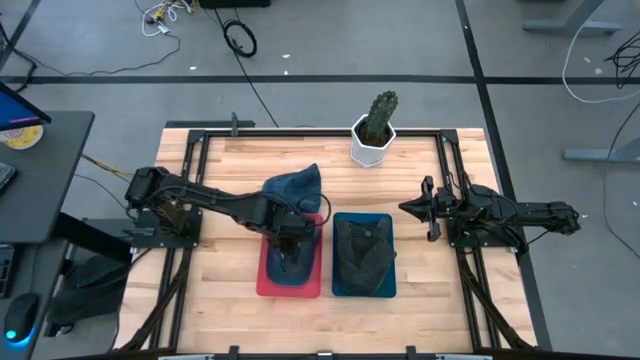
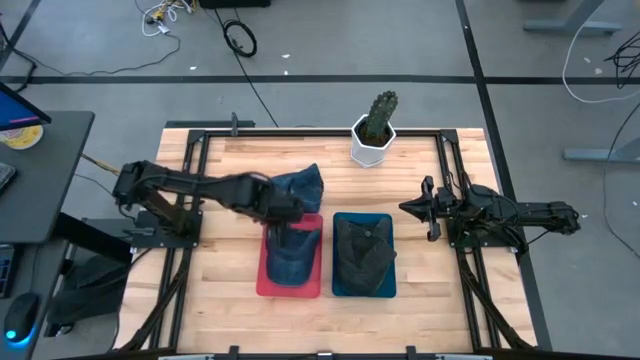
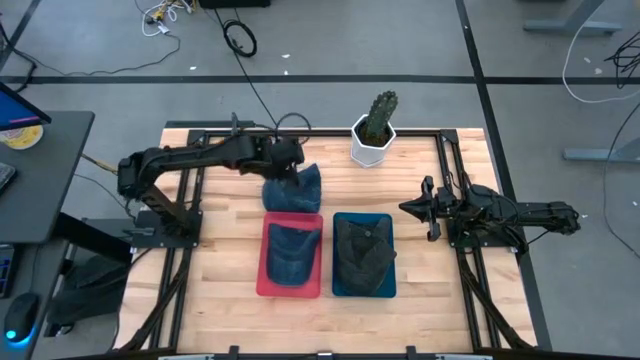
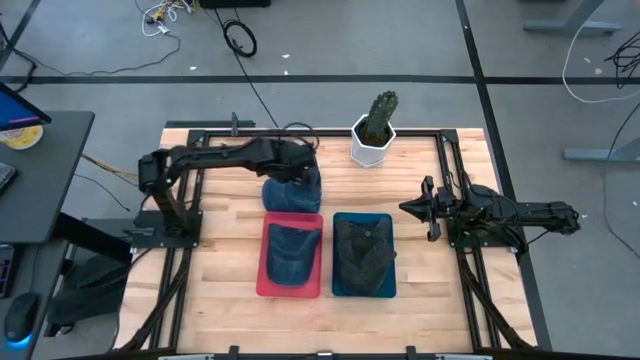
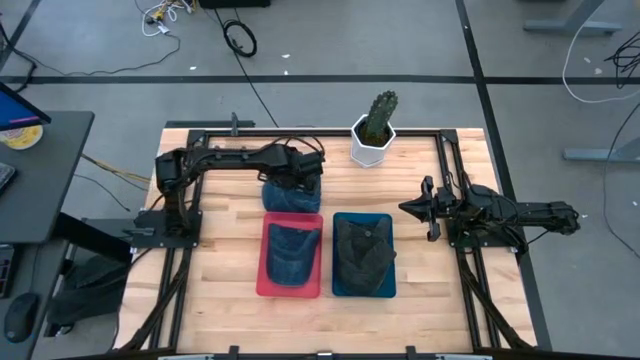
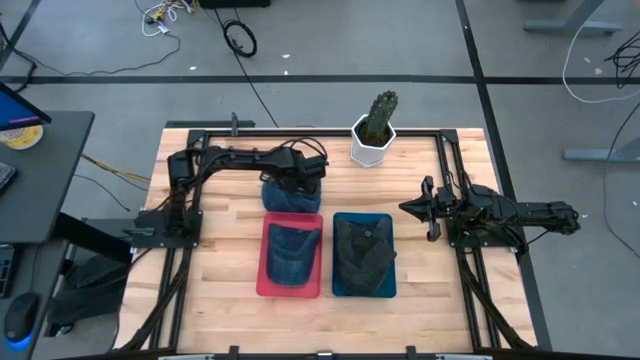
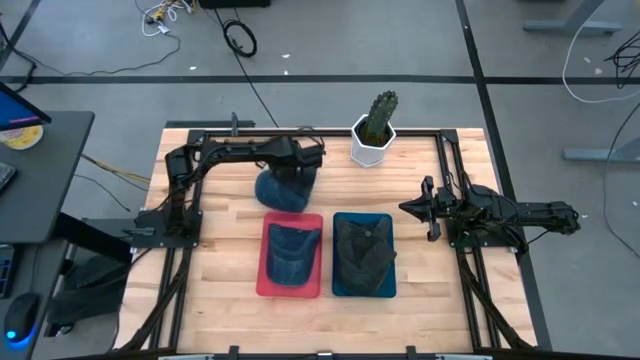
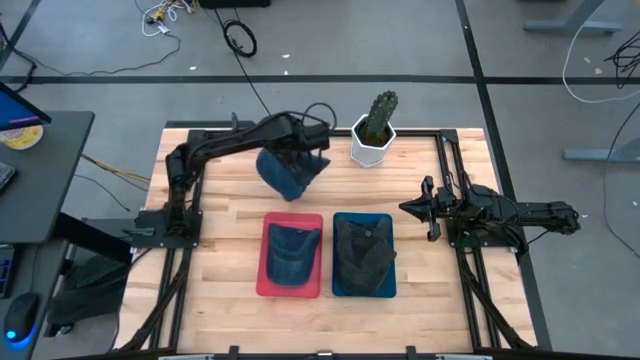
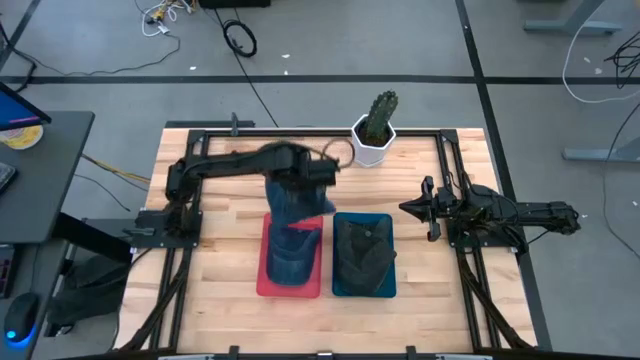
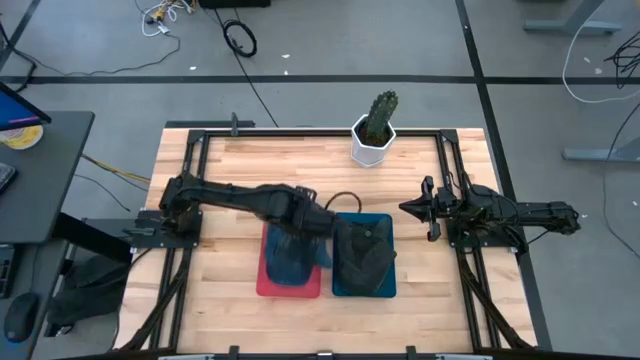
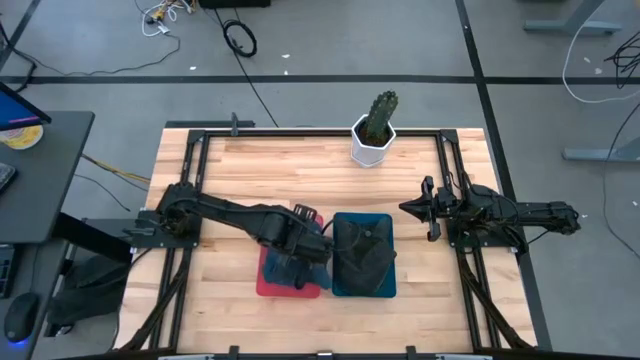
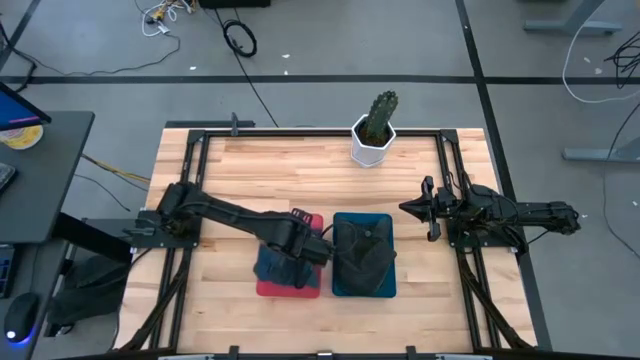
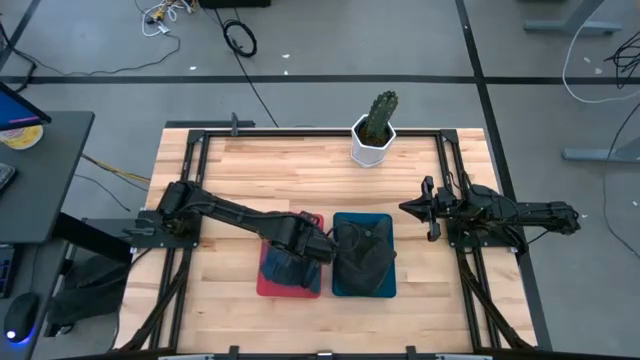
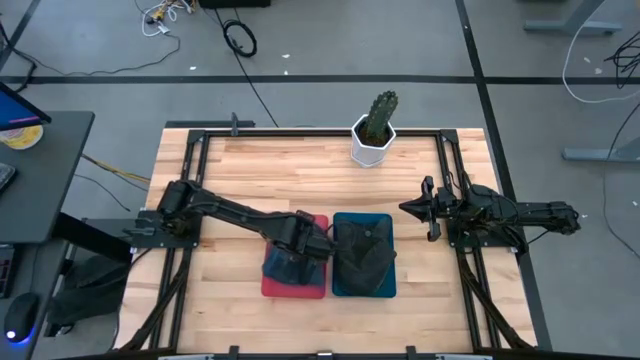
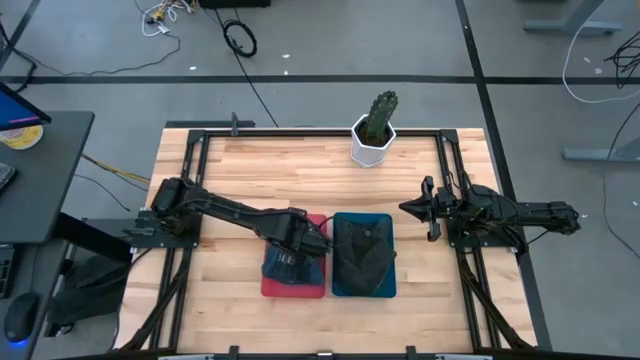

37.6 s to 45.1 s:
Task: Pick & Place hat
Put the blue cap in the red bin

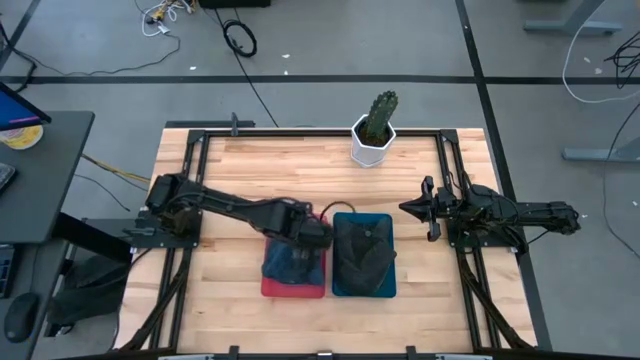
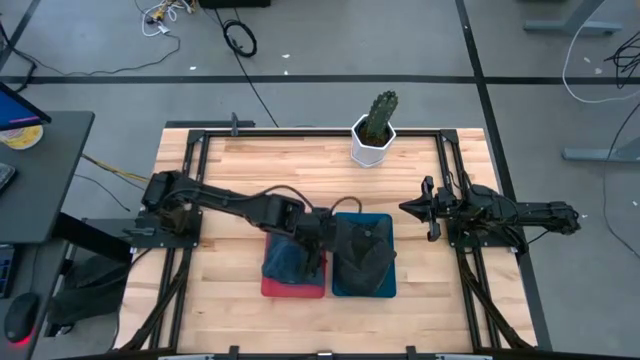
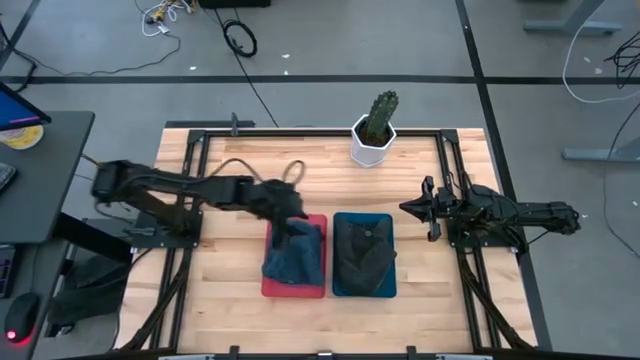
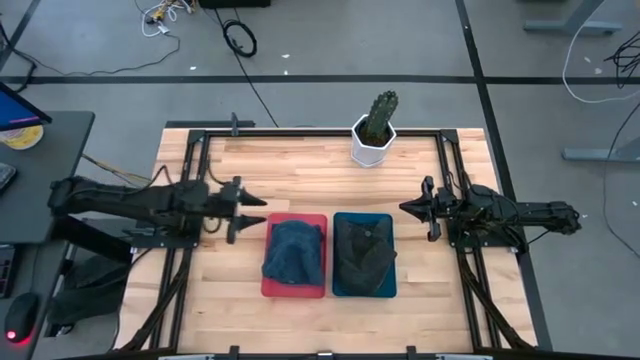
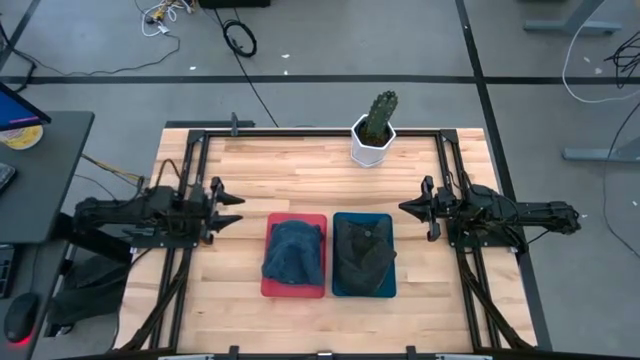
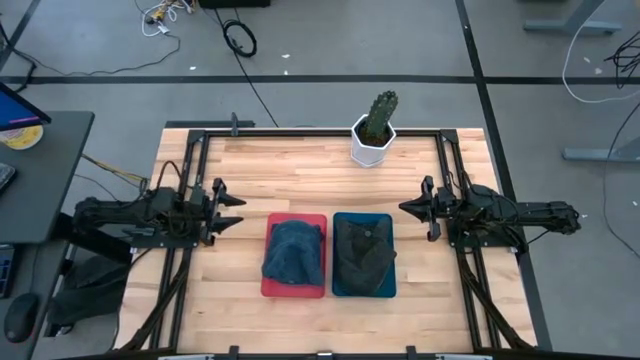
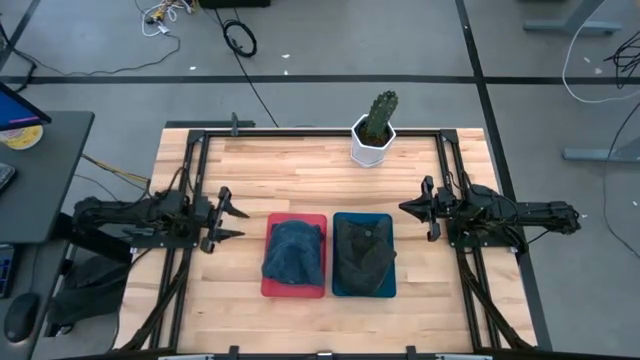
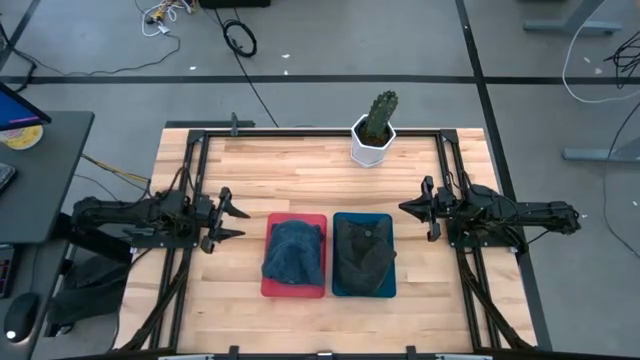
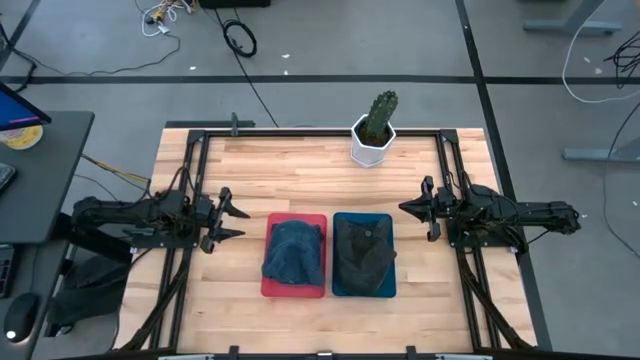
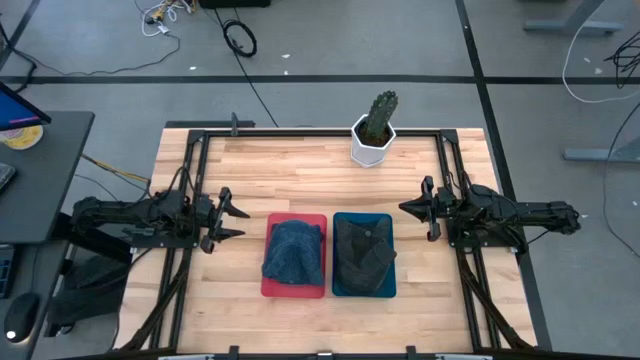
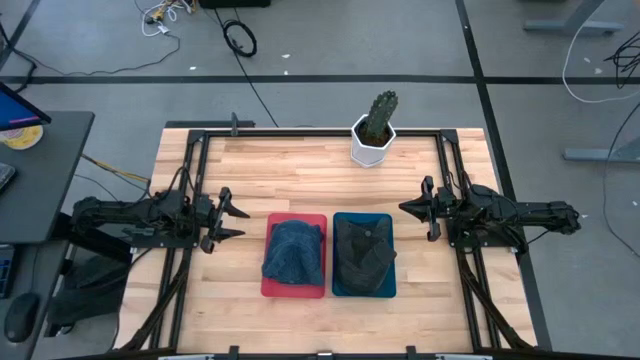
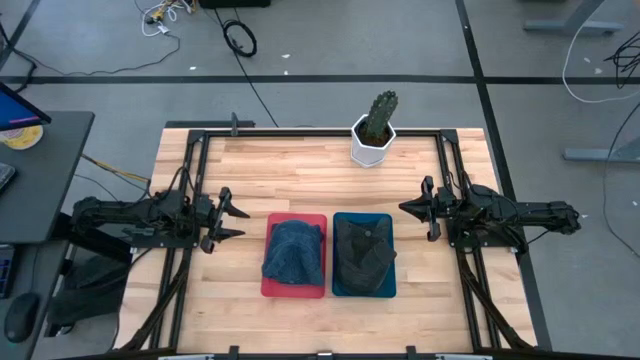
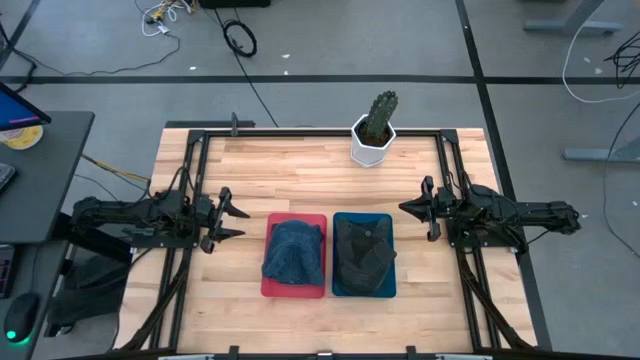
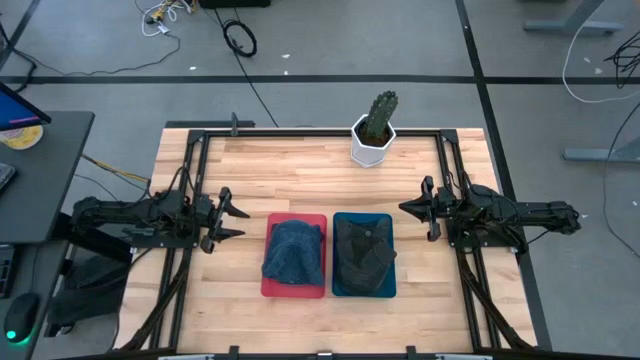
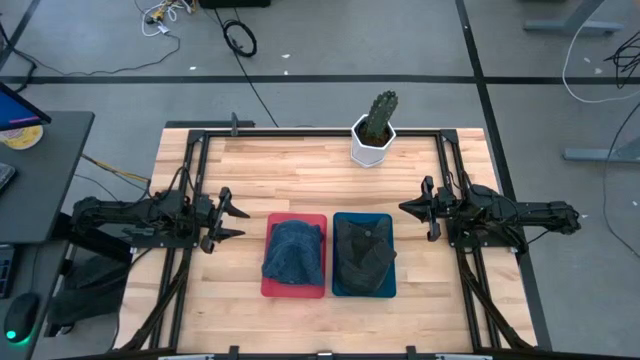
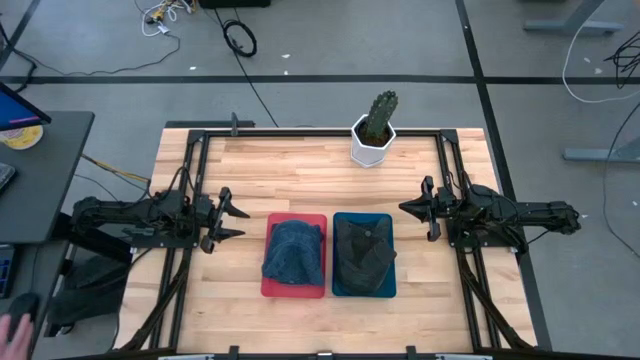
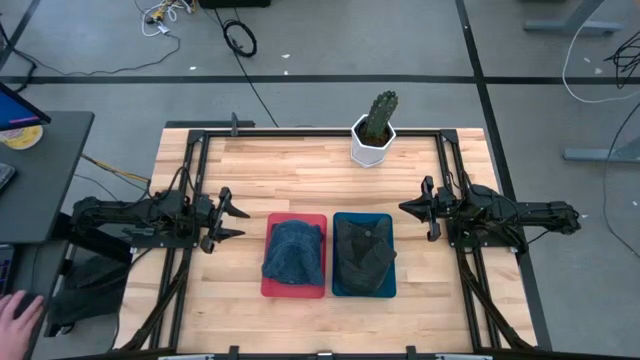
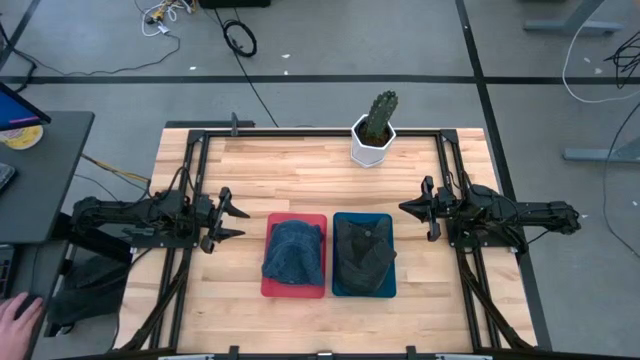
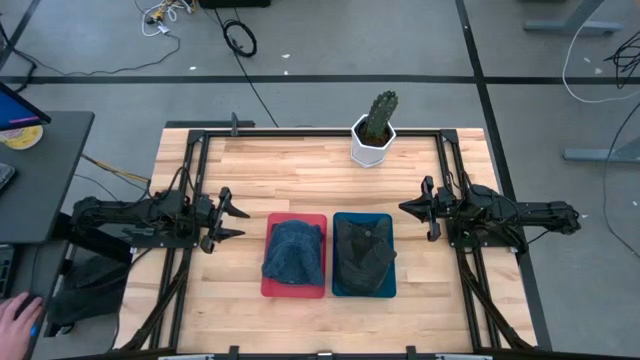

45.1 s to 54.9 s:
Return to Home Position

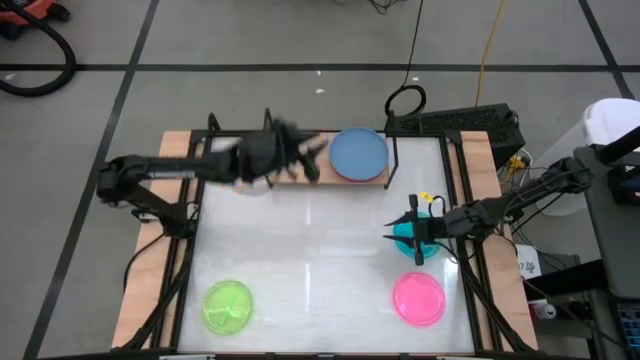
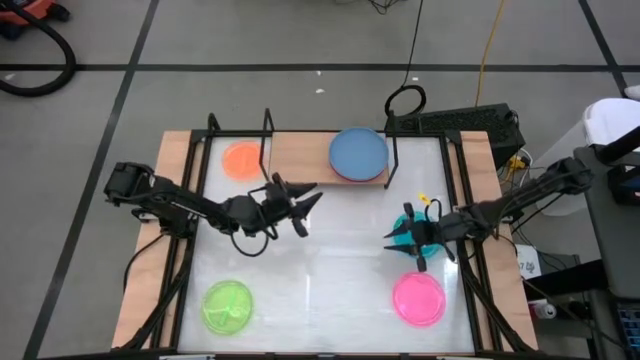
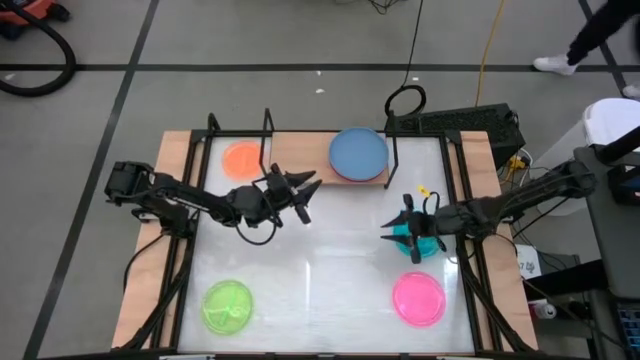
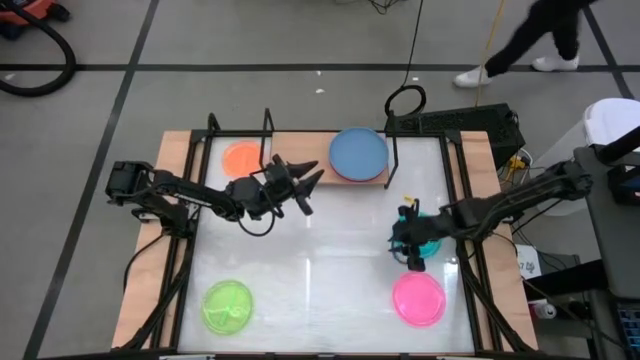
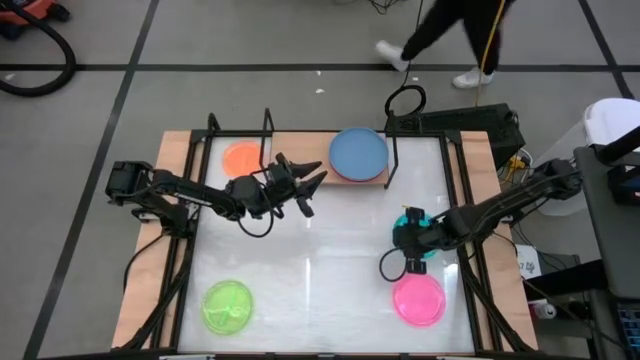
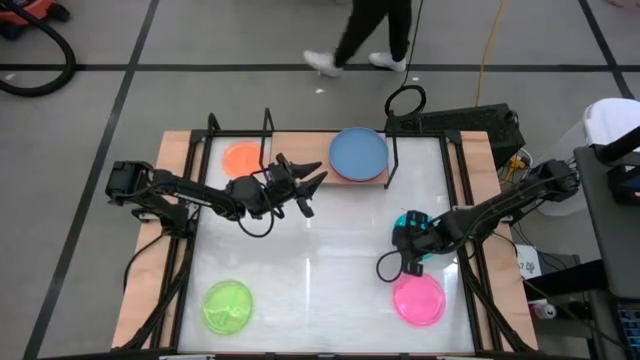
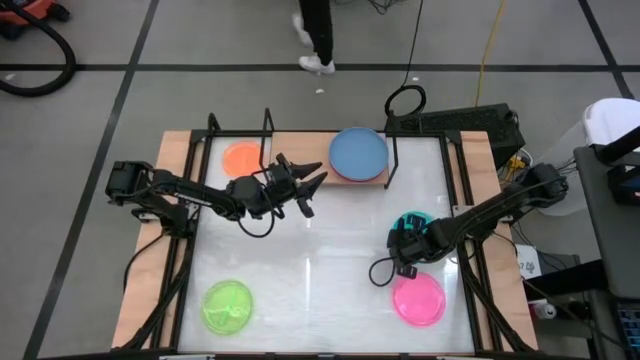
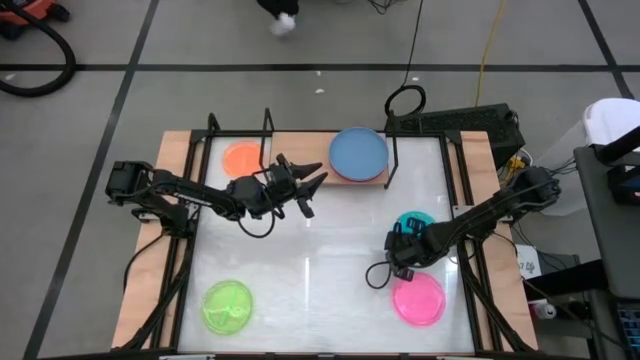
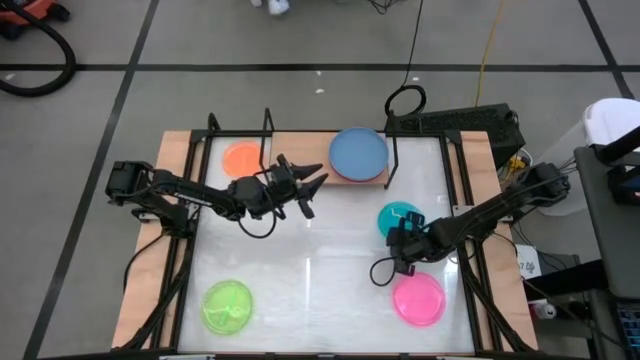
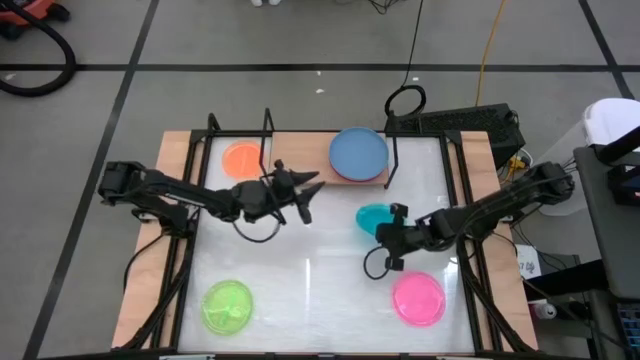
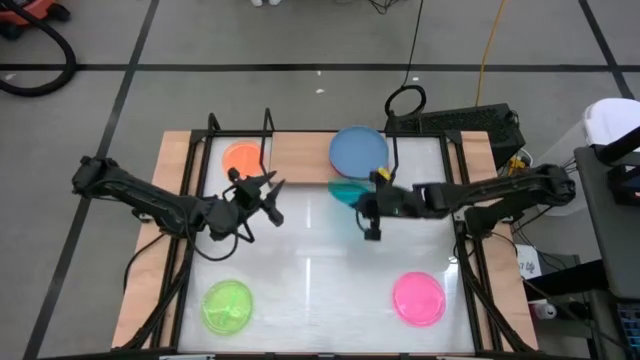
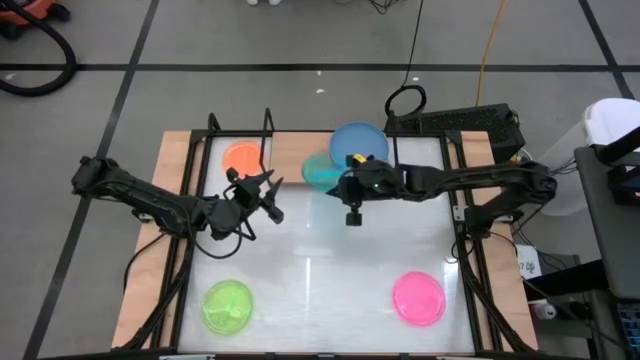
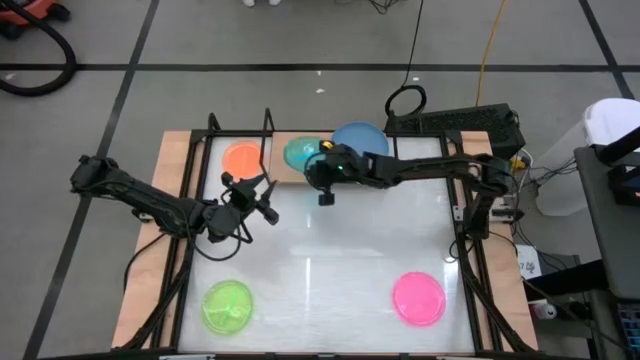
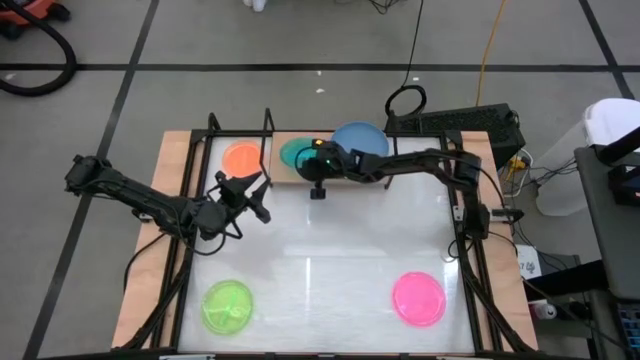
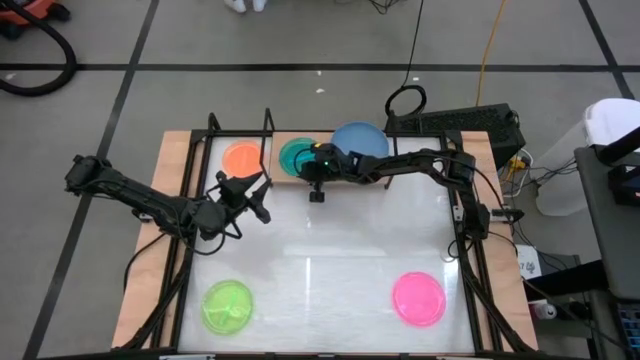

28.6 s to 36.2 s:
Task: Place and stack plates onto a shelf
Put the light blue plate on the shelf
